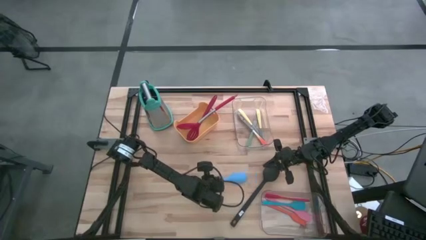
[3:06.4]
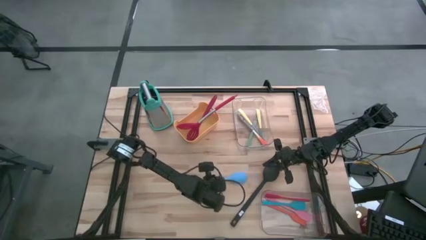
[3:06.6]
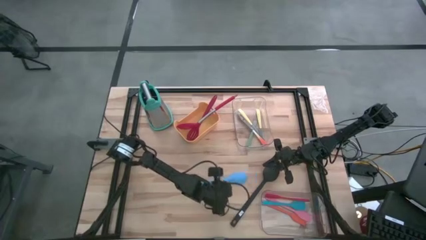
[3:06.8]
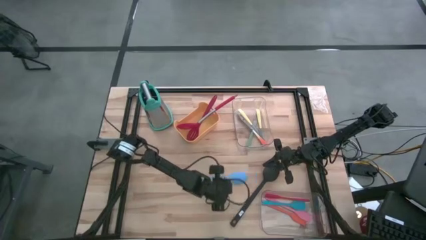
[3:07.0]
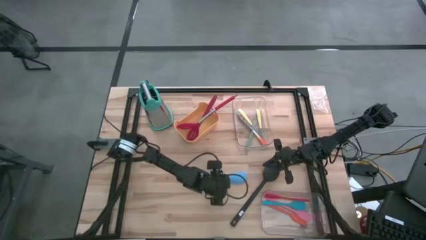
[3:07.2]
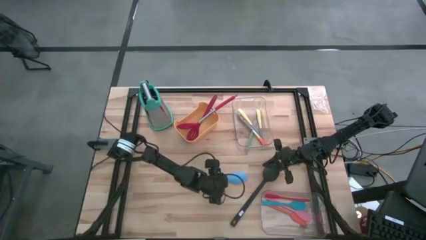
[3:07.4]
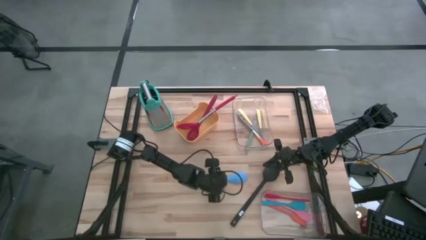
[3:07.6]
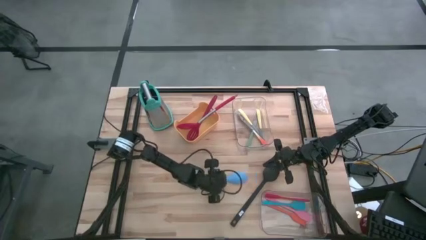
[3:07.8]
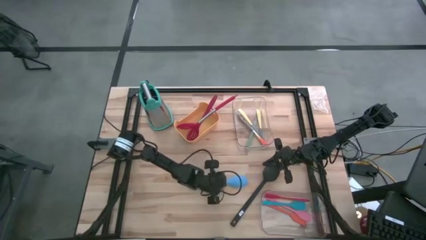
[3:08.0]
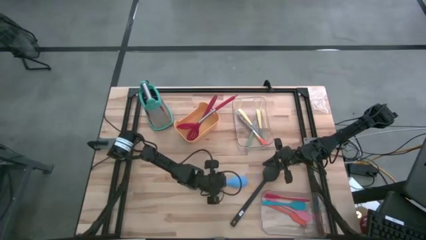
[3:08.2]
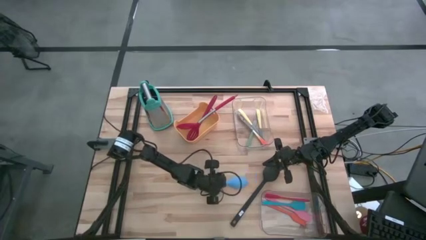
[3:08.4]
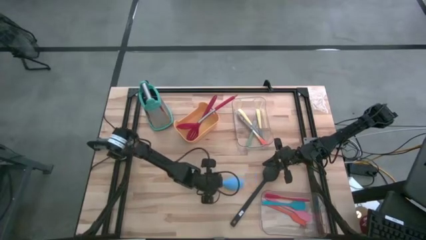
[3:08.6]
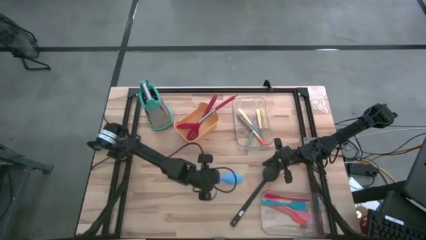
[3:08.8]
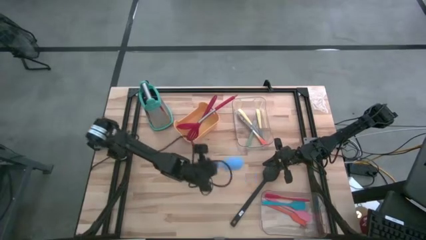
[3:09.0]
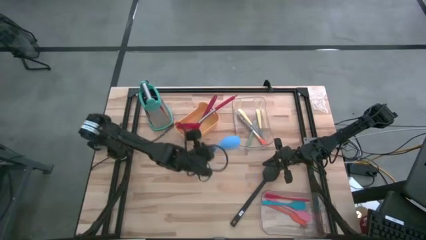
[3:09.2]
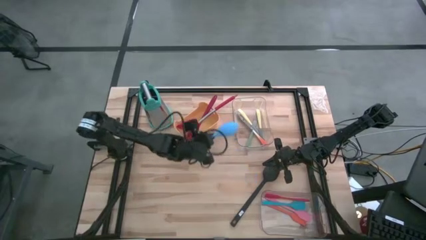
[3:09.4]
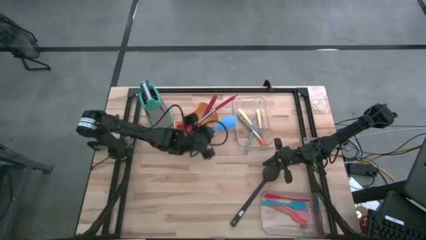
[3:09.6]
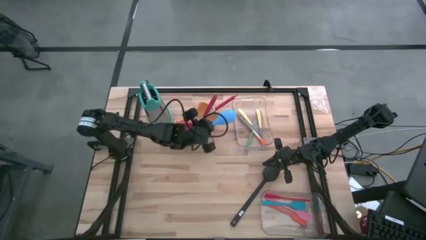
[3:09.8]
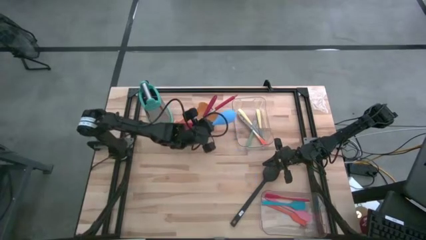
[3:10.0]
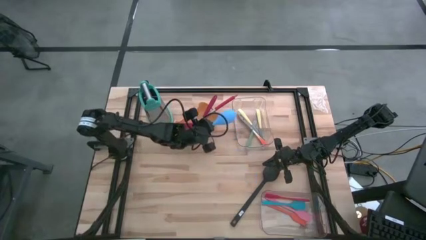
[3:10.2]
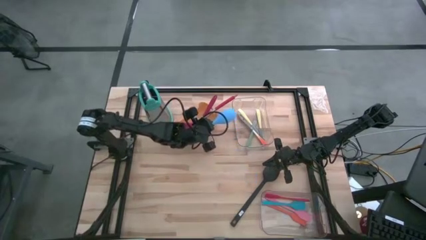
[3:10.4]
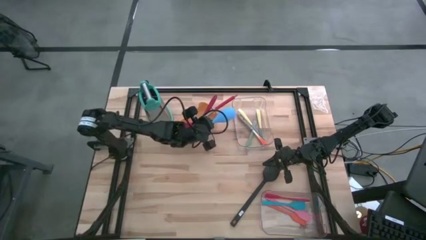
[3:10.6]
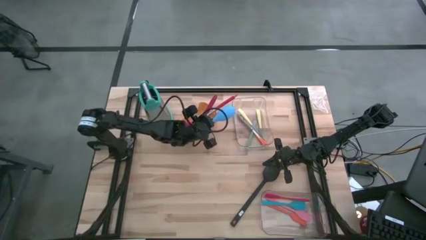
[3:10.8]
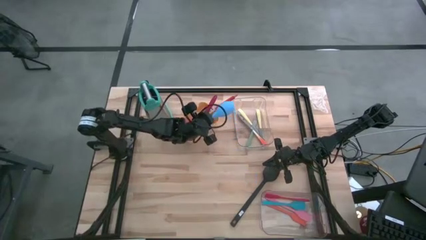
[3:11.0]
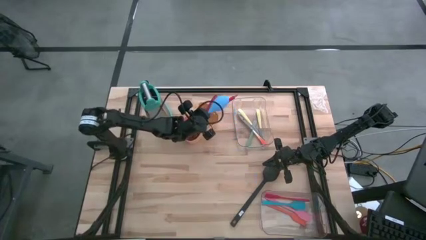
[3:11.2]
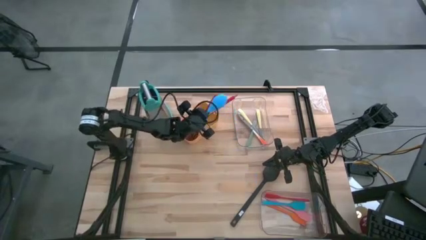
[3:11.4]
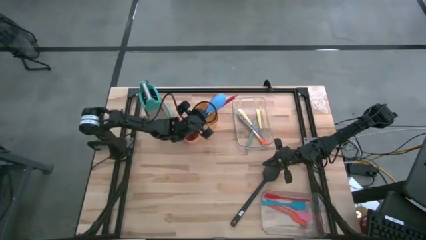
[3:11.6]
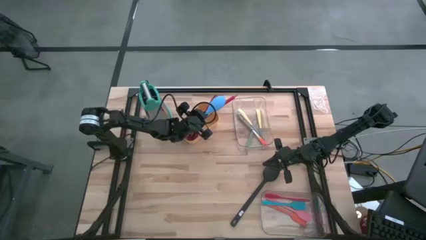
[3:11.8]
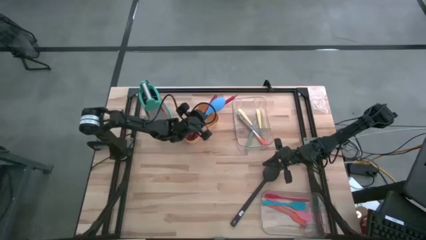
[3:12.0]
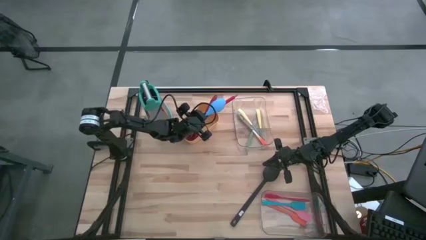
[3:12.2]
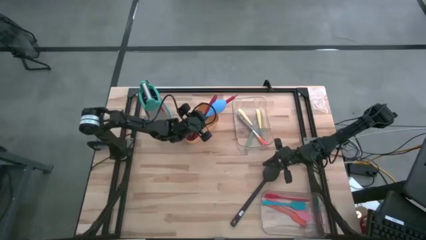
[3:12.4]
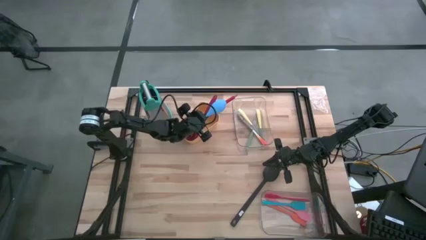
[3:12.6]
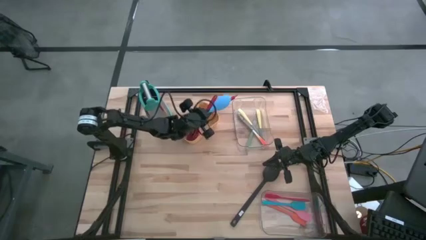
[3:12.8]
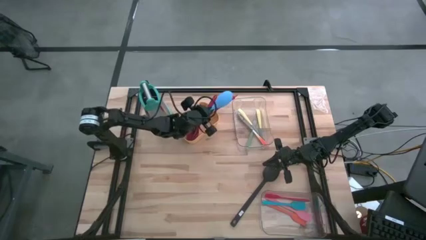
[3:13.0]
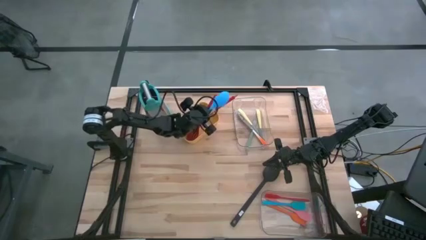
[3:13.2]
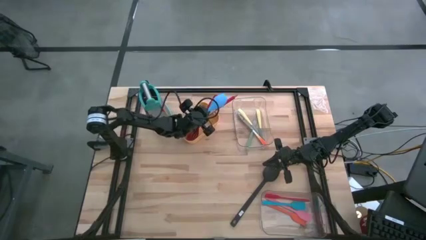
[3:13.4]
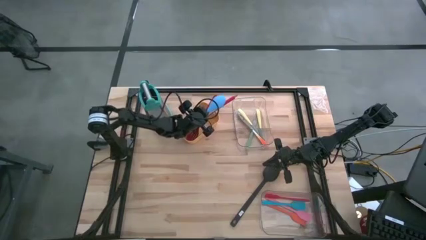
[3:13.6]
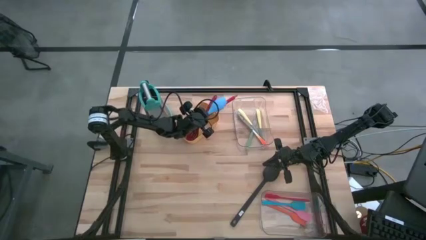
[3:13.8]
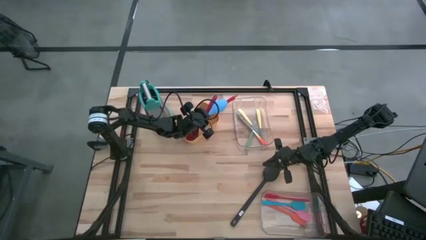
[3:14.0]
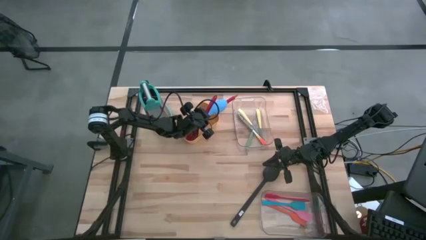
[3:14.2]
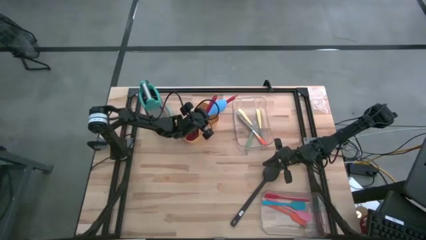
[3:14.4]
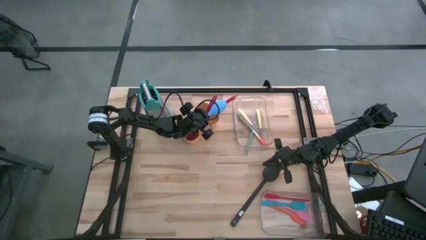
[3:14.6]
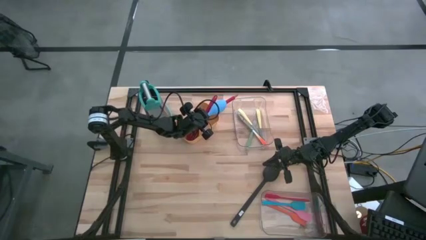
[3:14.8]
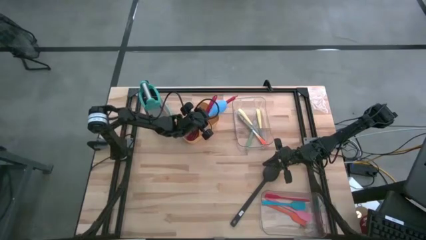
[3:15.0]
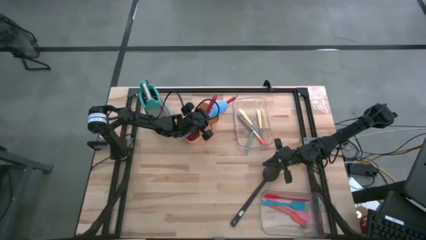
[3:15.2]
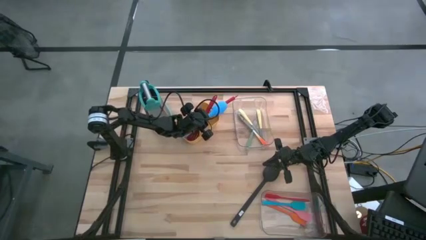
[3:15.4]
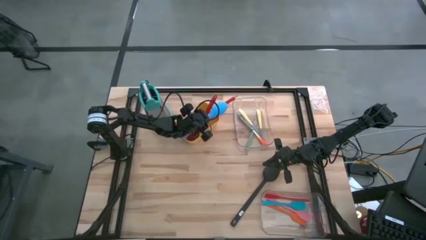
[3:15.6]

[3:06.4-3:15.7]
Task: Pick & Place Kitchen Items
Put the sky blue serving spoon into the orange bin

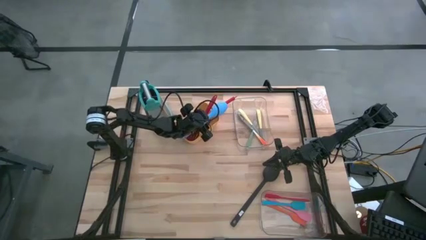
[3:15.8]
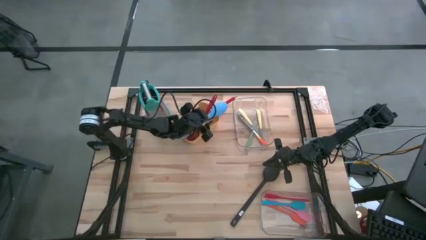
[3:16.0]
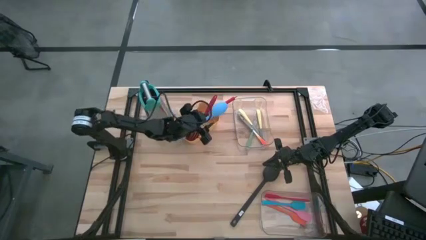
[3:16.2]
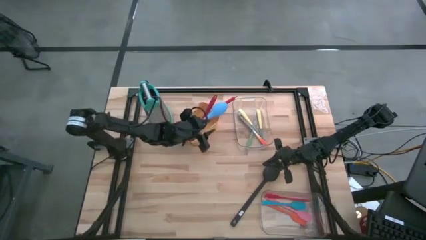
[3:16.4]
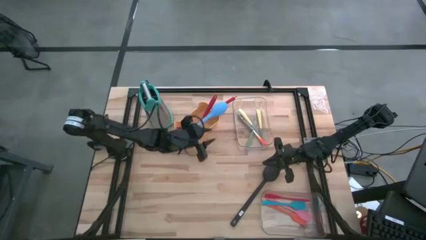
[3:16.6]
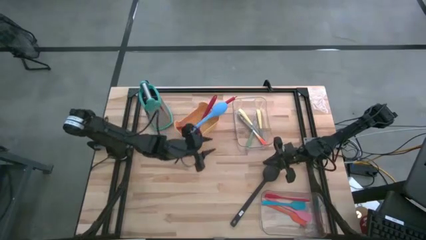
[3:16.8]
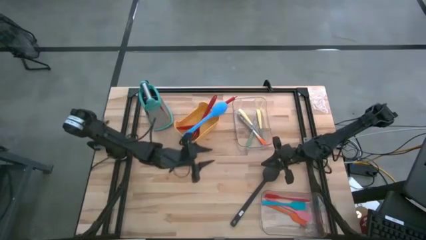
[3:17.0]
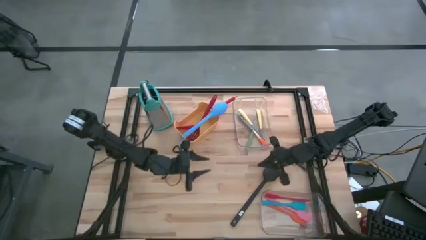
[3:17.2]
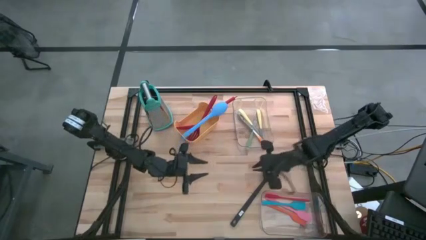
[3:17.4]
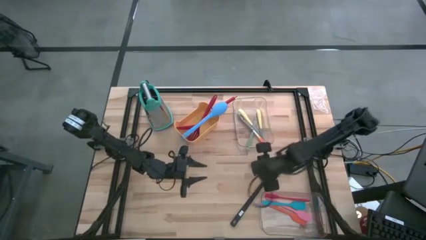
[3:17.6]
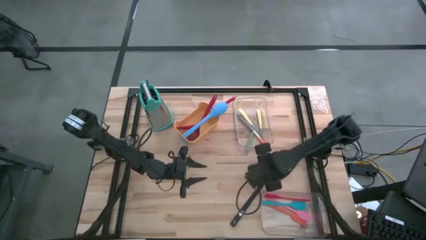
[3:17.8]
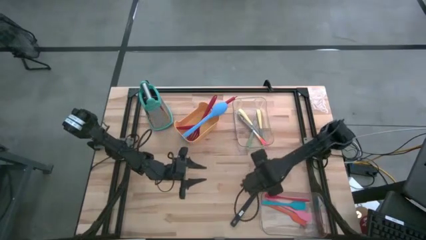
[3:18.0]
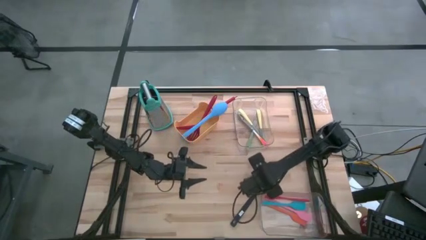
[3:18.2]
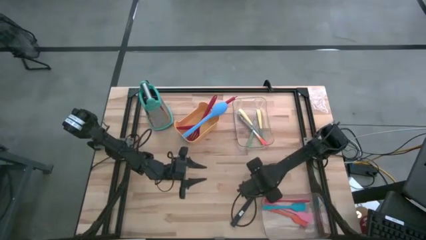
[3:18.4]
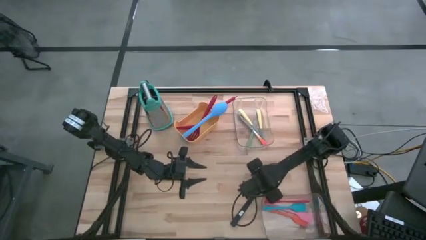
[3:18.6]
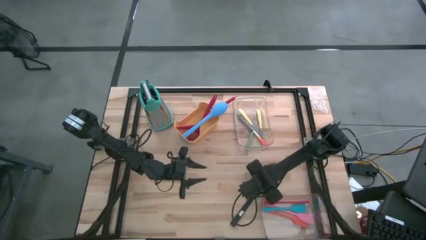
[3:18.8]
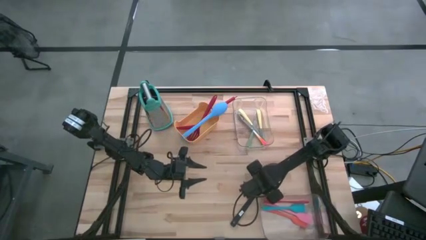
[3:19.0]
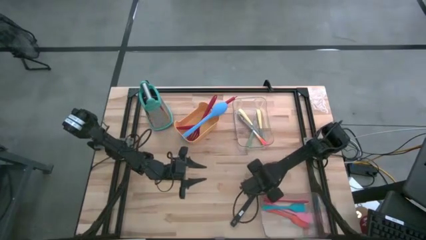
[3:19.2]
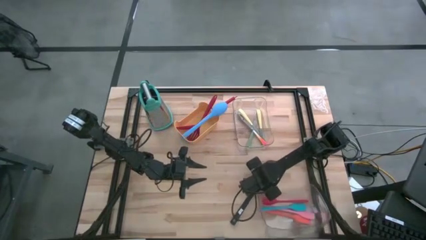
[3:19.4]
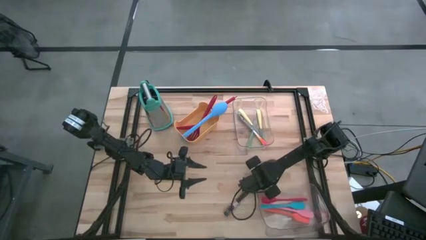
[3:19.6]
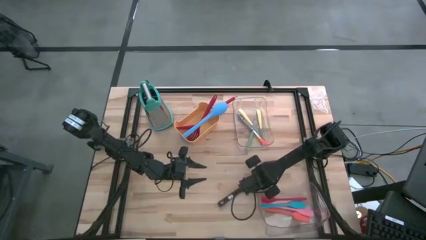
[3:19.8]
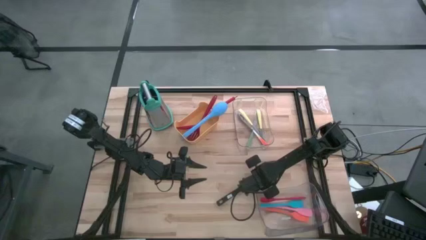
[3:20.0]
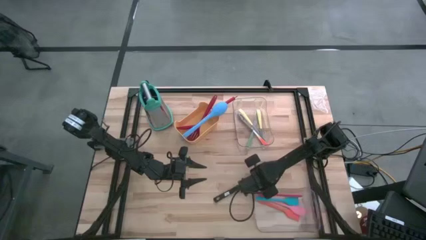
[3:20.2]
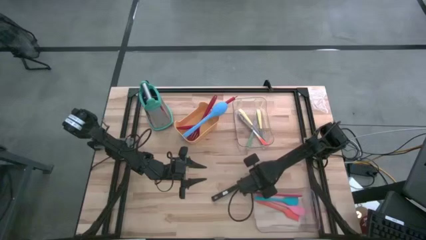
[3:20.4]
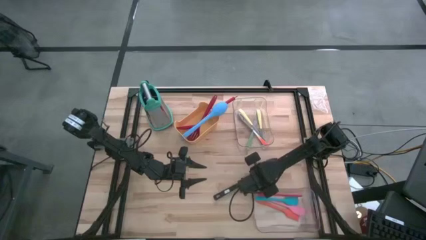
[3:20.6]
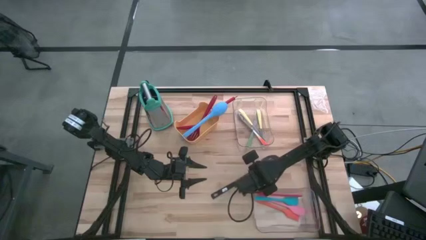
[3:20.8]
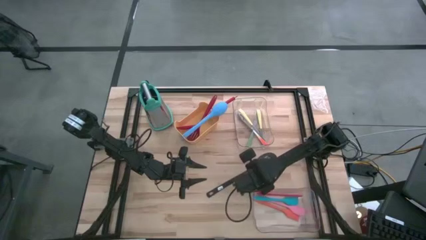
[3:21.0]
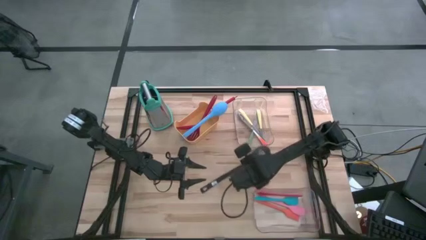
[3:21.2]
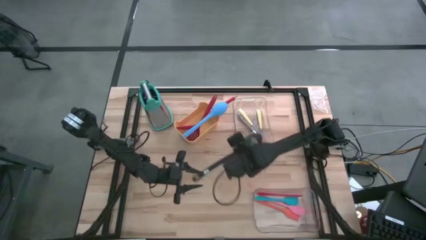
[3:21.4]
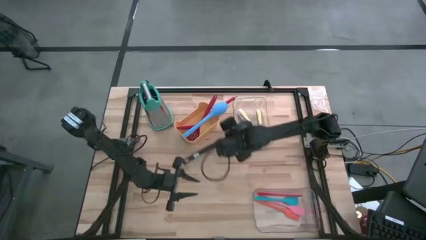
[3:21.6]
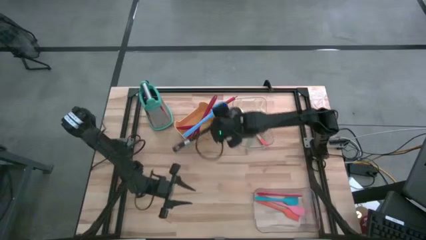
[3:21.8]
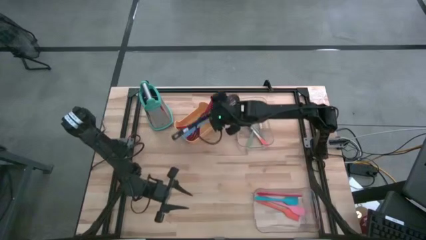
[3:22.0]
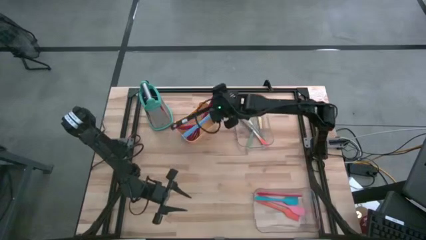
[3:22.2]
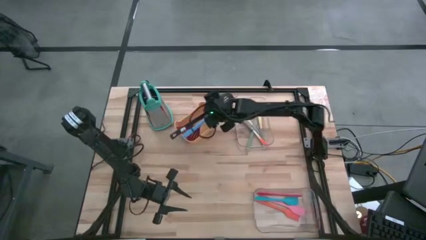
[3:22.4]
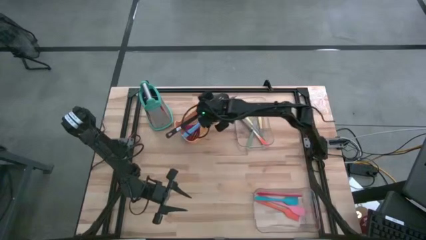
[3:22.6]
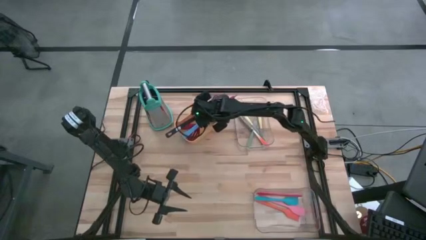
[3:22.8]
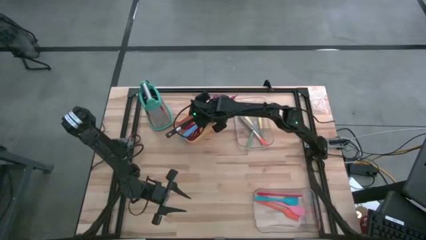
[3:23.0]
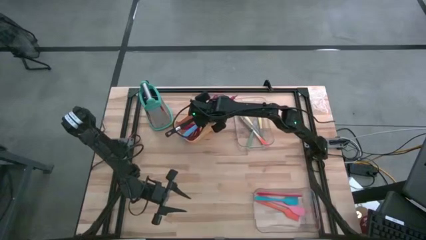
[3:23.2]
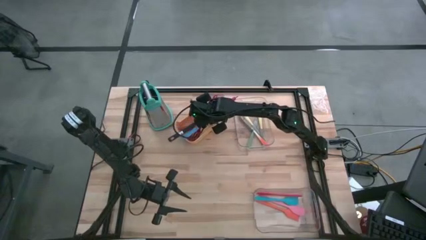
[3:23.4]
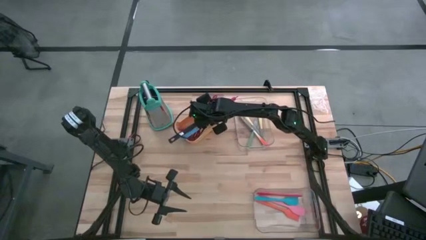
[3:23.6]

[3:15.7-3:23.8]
Put the black slotted spoon into the orange bin
